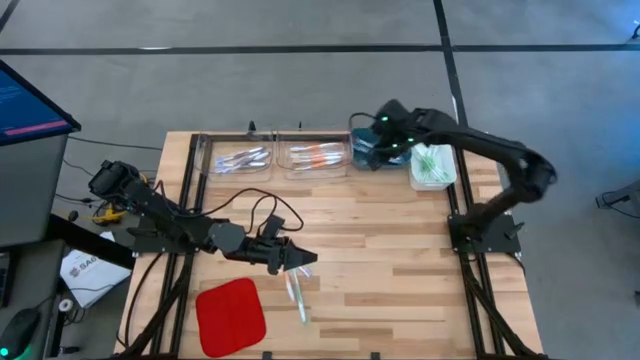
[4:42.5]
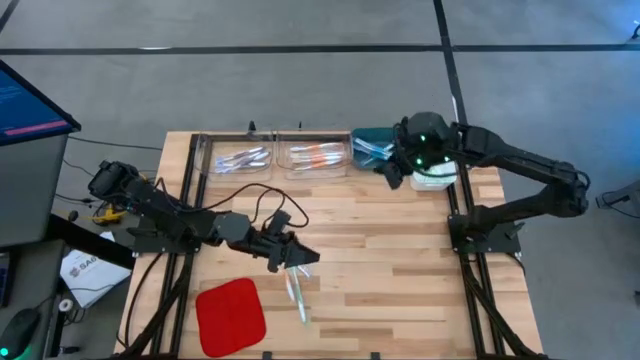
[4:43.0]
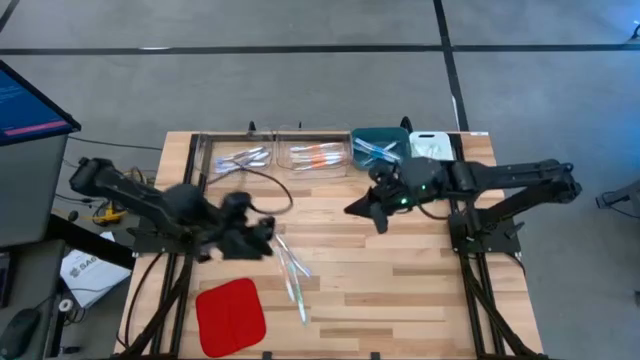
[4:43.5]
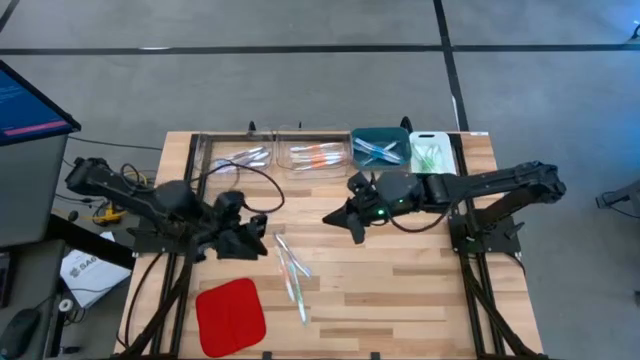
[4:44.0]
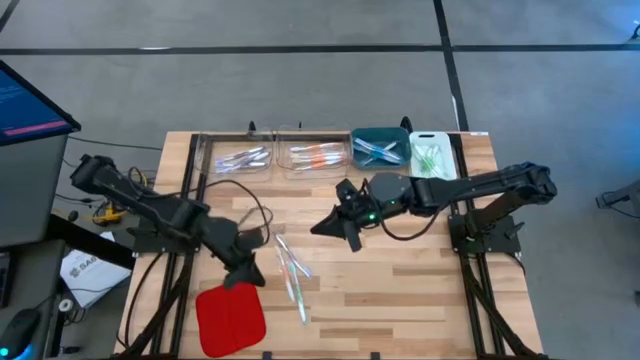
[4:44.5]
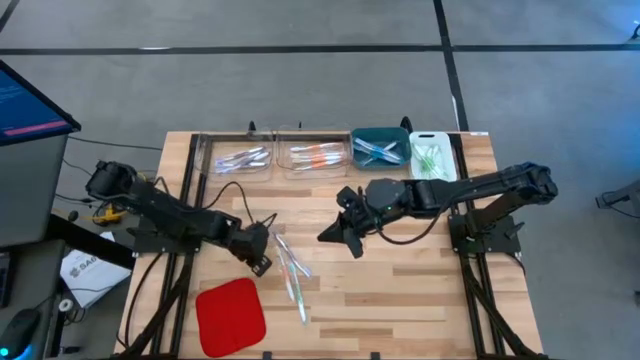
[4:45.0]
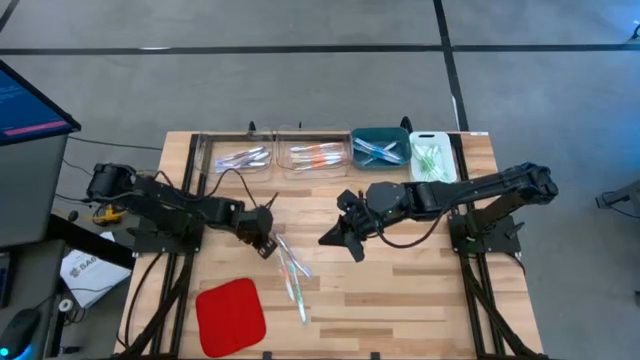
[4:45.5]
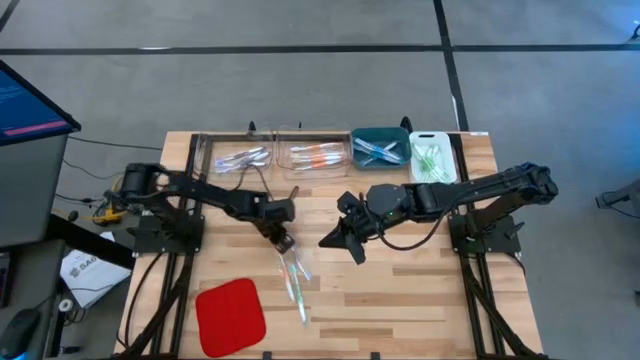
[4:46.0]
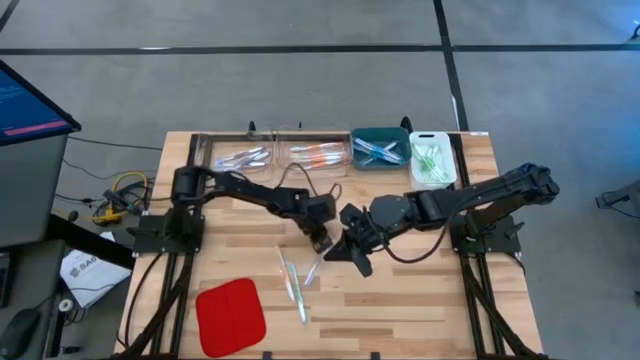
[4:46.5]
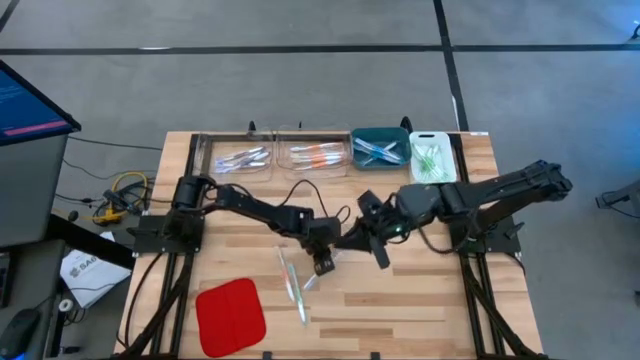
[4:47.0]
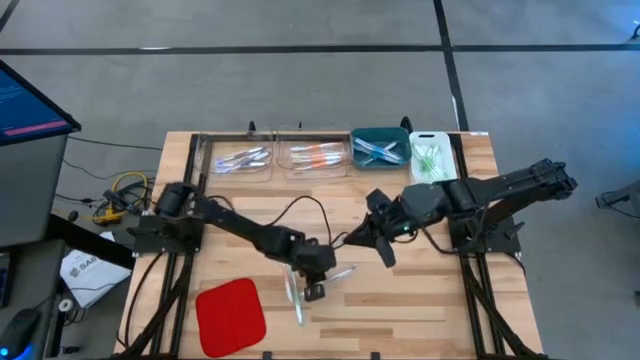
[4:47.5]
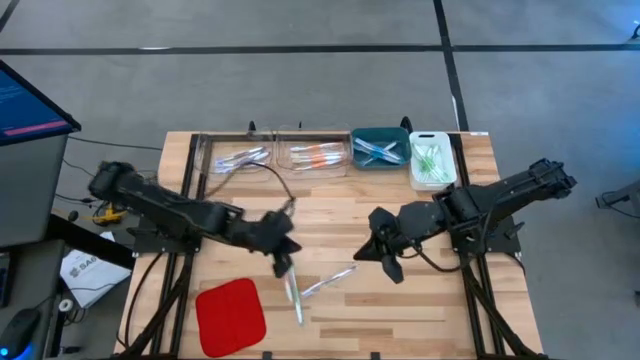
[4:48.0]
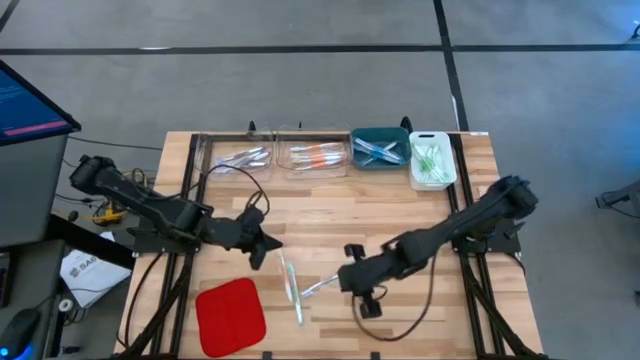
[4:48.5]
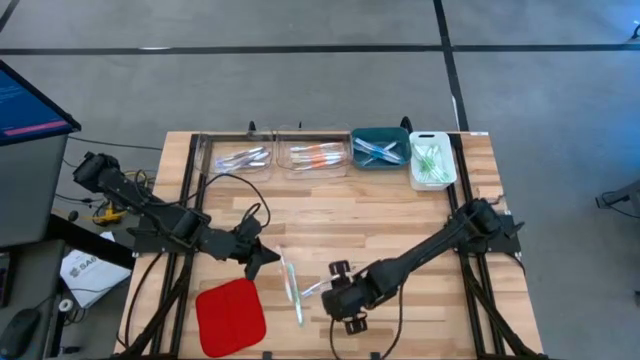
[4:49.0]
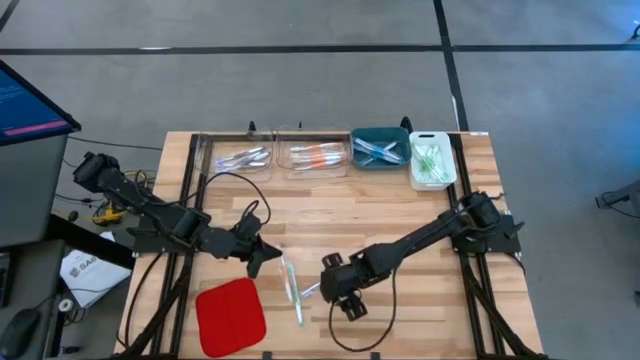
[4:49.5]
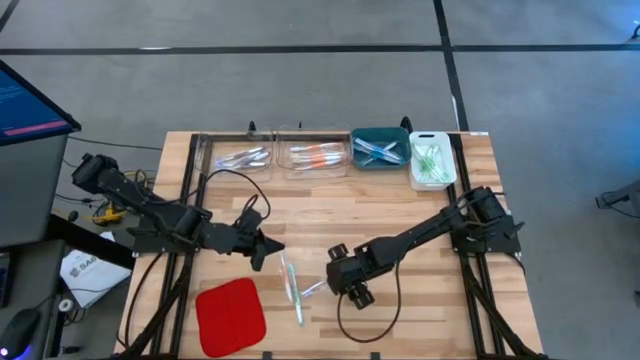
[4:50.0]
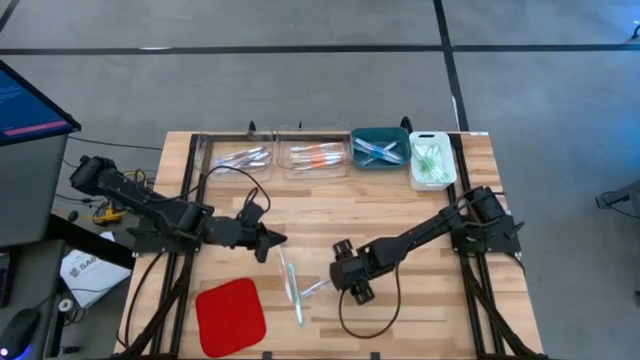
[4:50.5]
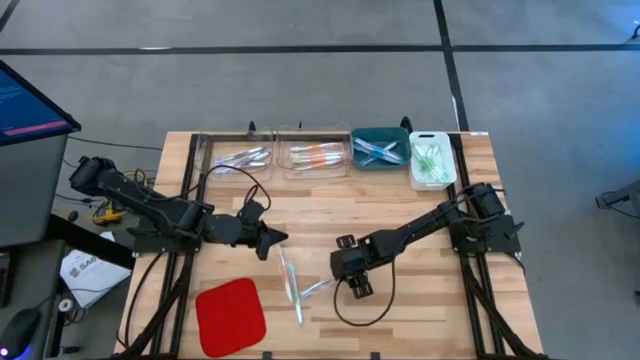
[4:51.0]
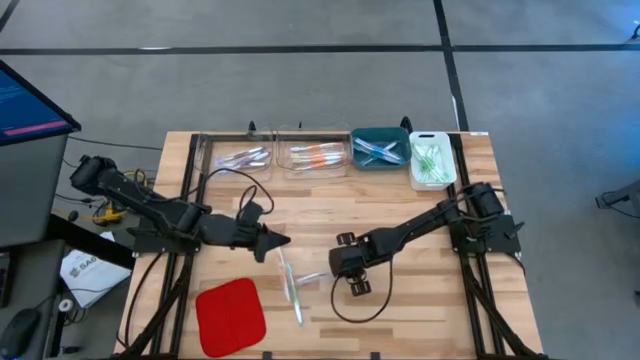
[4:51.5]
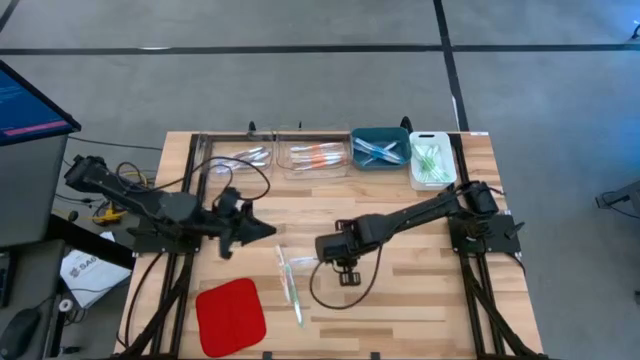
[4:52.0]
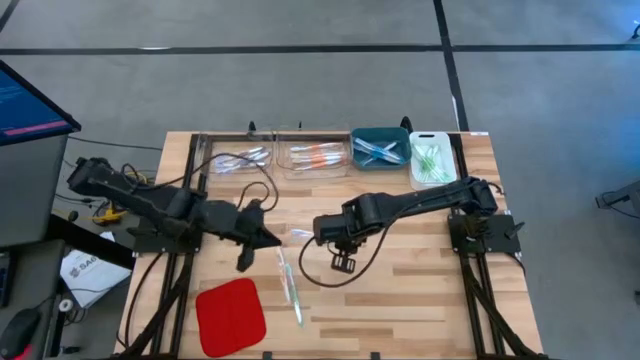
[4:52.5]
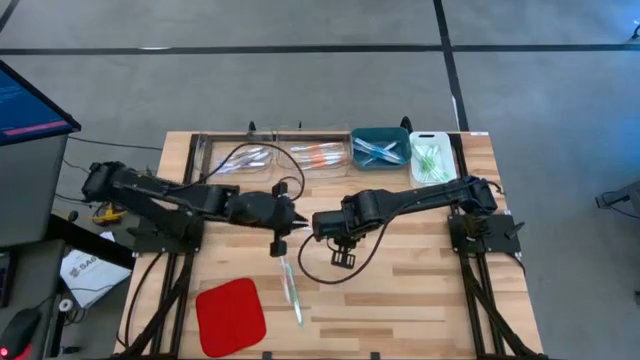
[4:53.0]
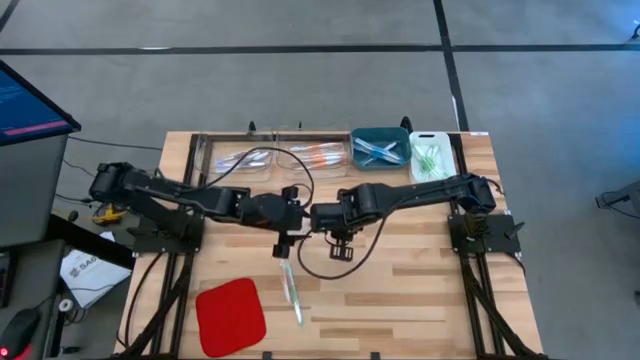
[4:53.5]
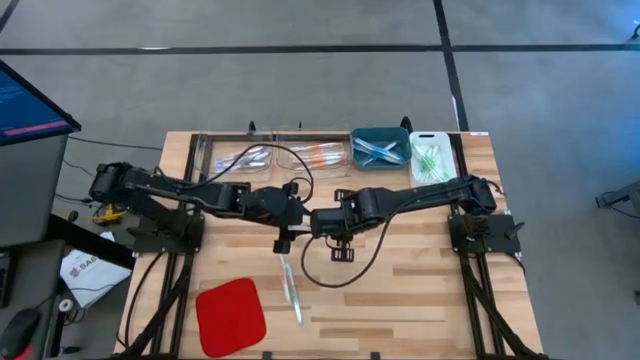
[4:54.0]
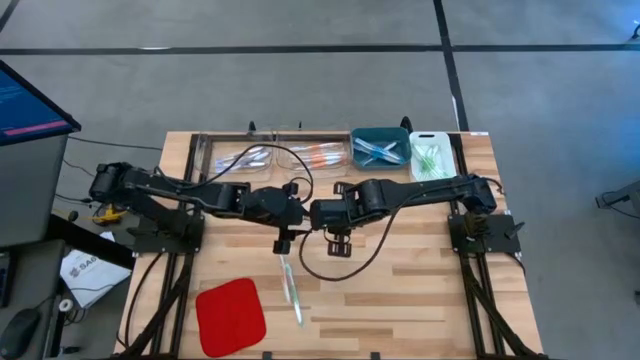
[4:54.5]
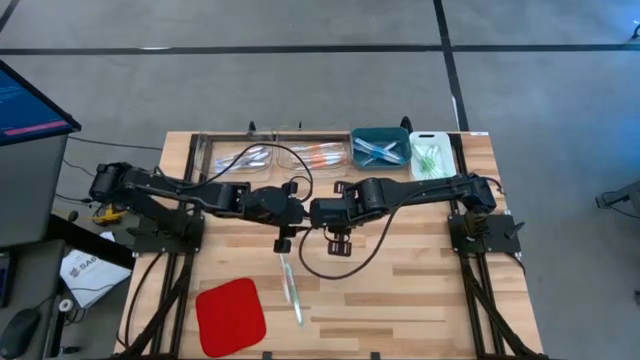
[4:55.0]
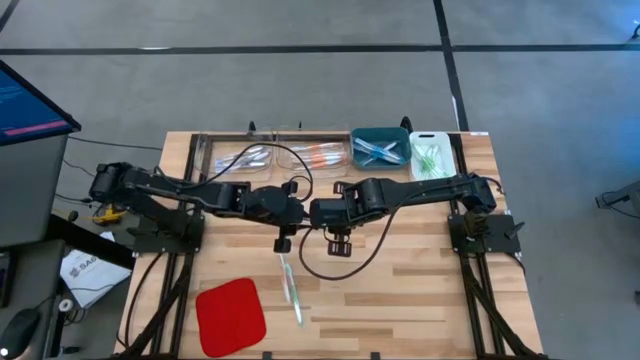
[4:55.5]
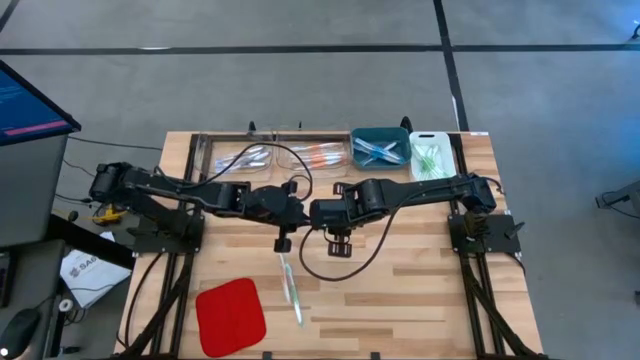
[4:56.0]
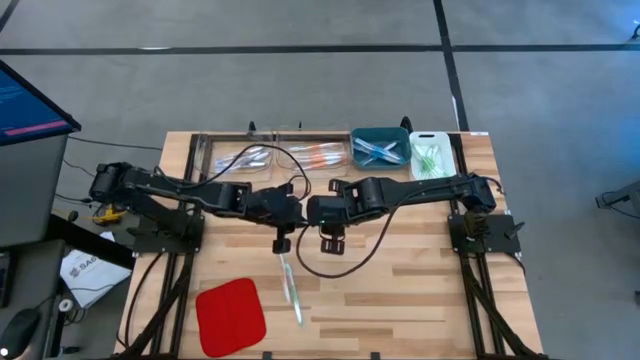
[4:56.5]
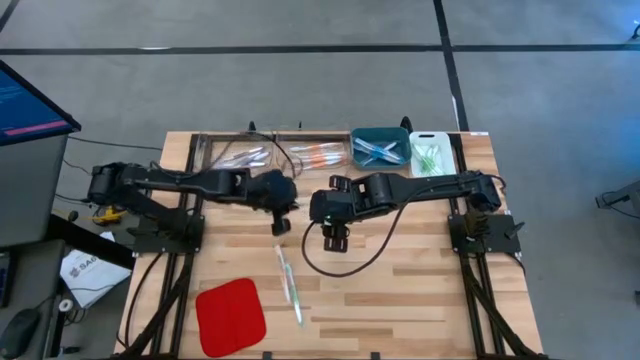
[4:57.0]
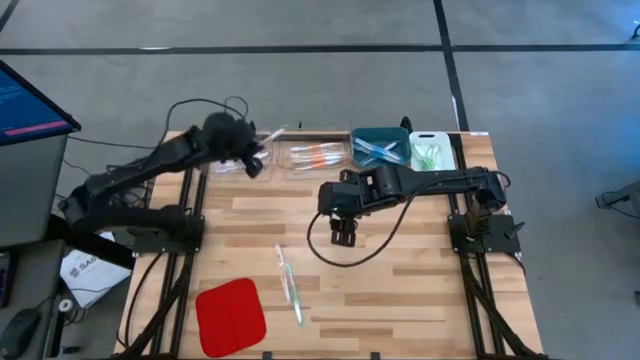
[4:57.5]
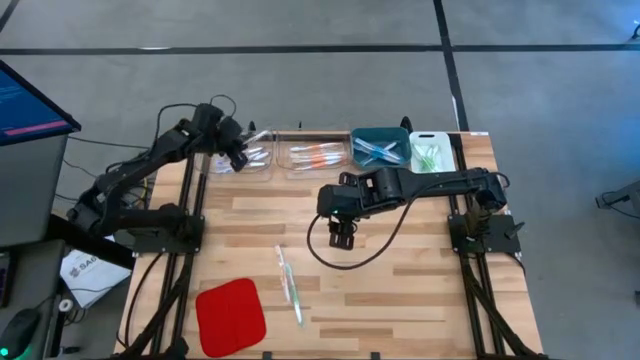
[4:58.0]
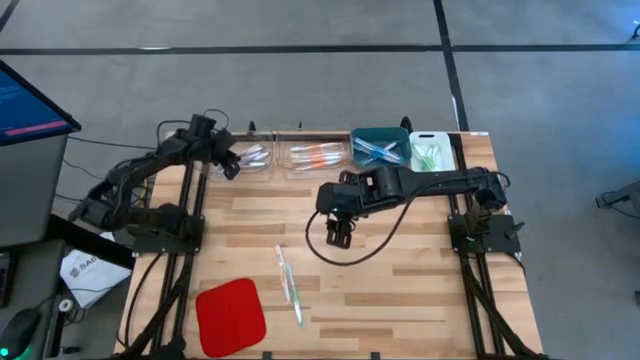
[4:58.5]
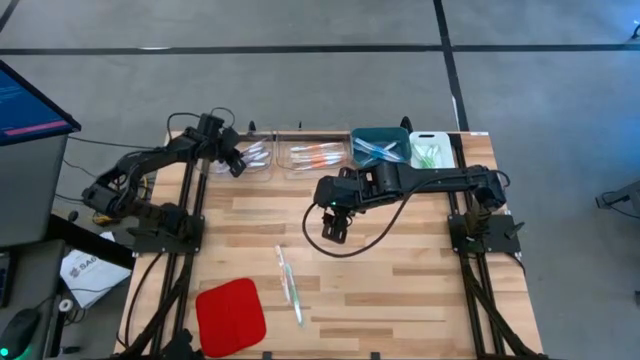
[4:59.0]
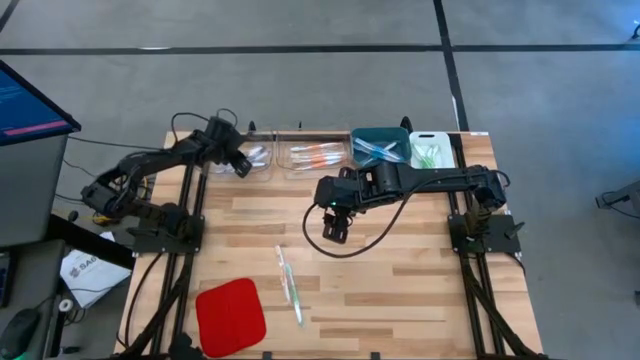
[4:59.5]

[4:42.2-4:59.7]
Task: Pick & Place Toothbrushes
Put the violet toothbrush into the left transparent bin

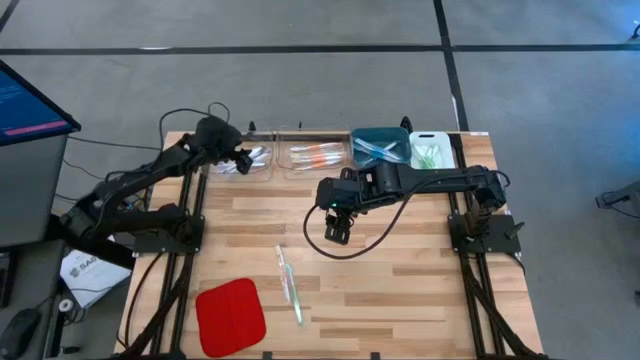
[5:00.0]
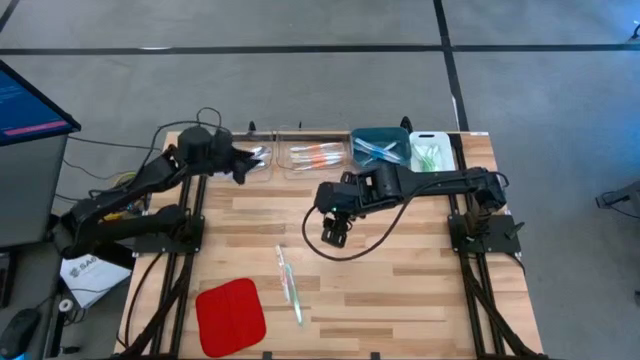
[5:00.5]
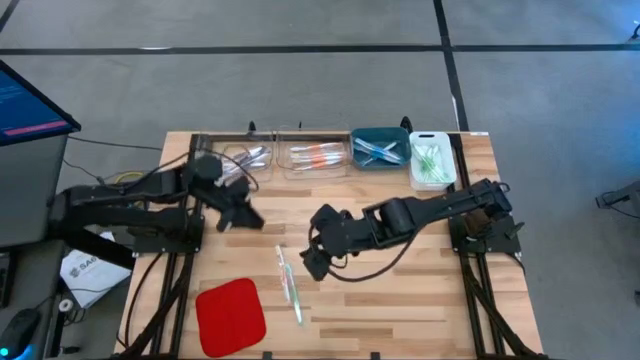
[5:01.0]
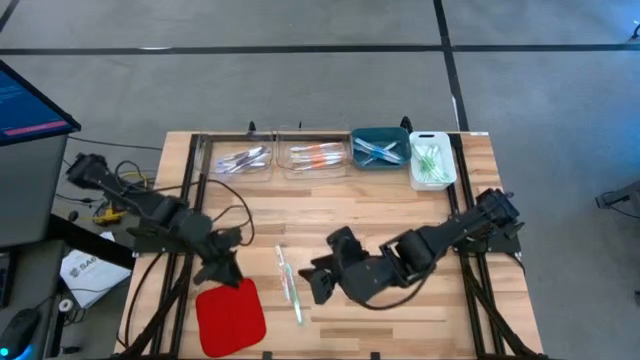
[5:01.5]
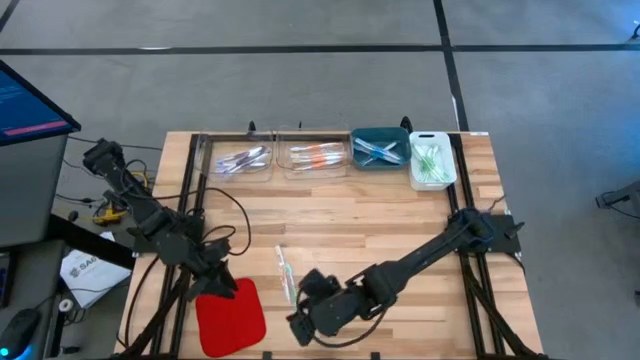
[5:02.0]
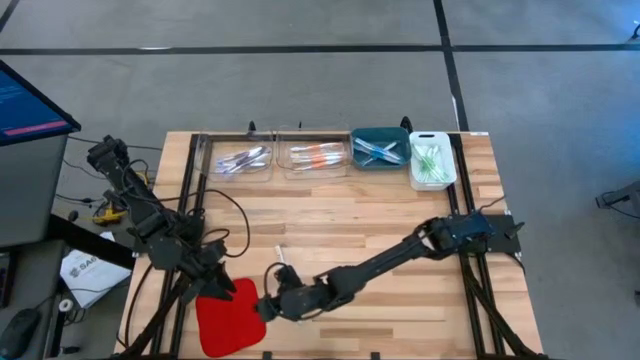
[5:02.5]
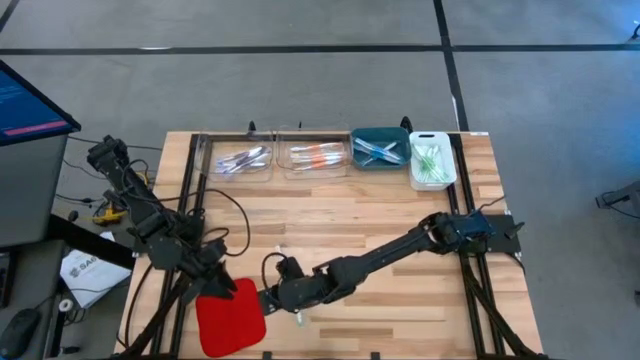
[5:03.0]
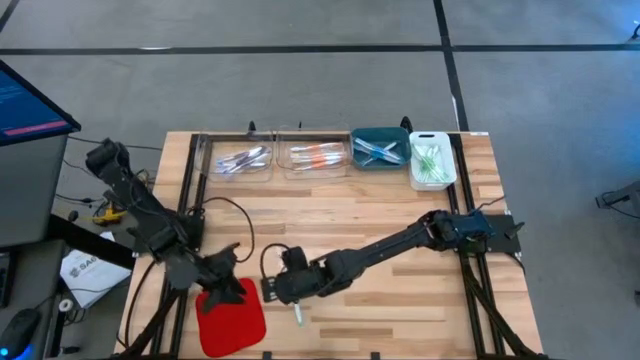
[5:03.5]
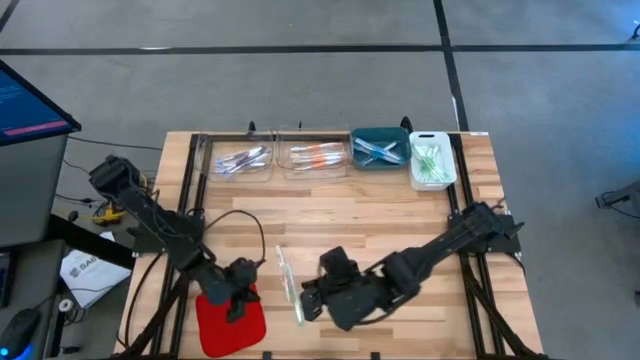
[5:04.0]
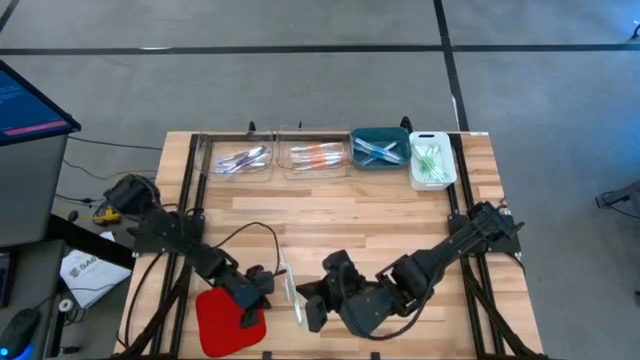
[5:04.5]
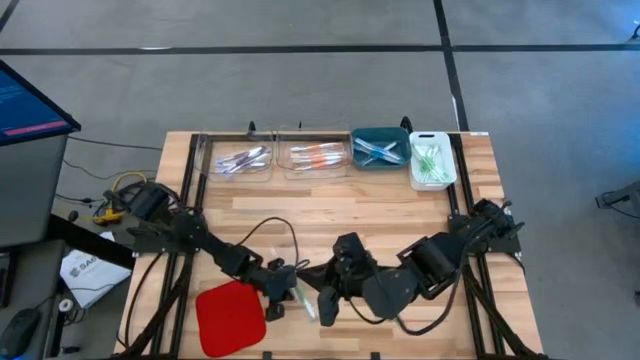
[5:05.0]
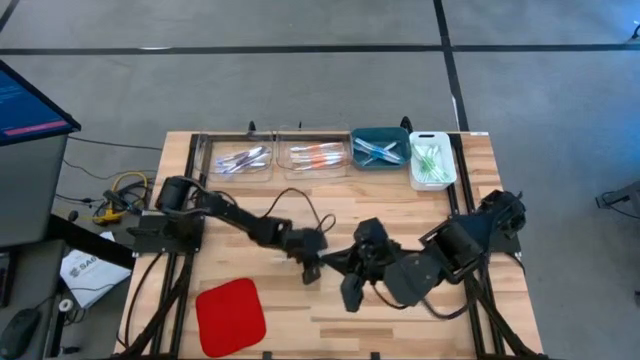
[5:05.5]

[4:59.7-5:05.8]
Adjust the colored toothbrushes
